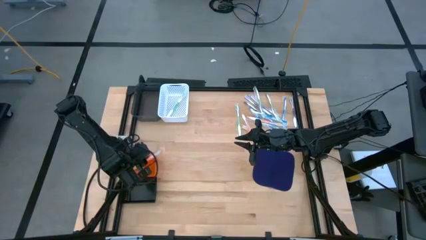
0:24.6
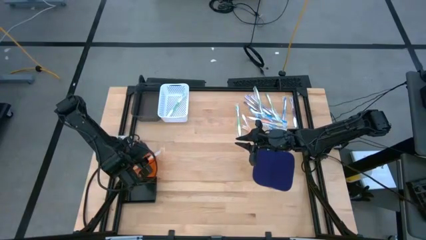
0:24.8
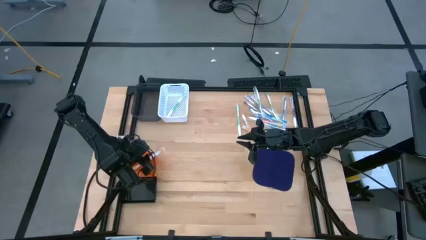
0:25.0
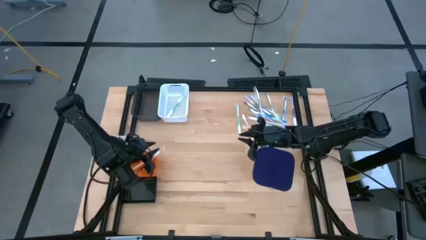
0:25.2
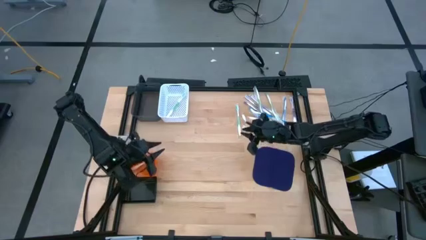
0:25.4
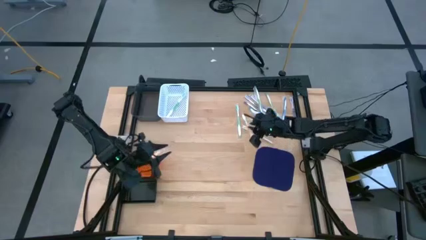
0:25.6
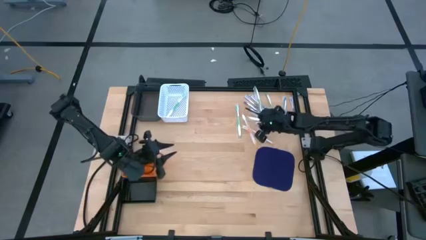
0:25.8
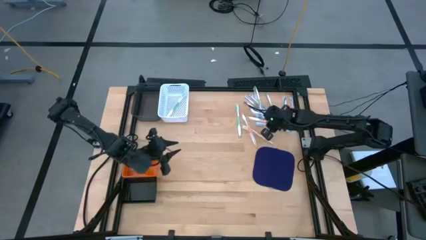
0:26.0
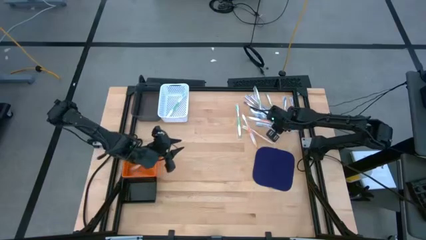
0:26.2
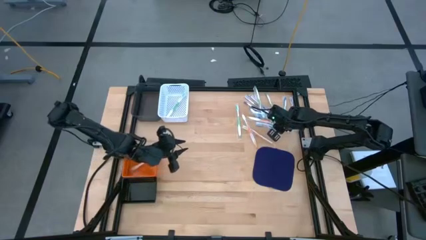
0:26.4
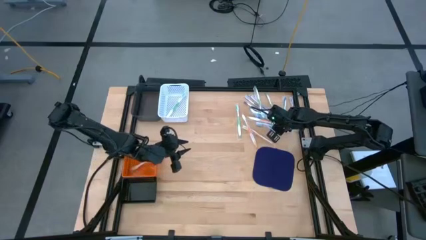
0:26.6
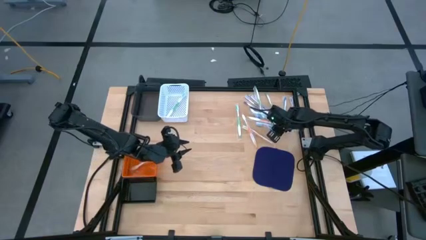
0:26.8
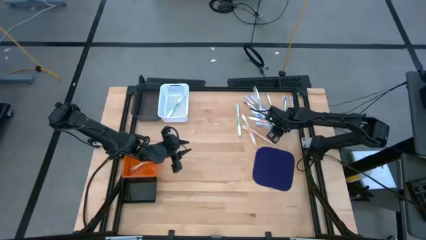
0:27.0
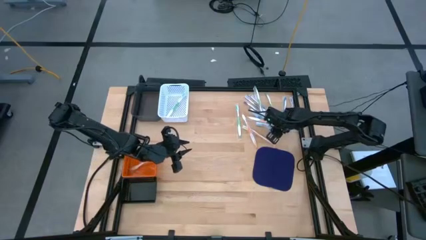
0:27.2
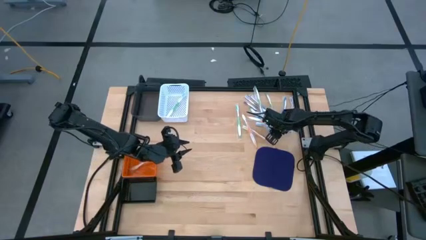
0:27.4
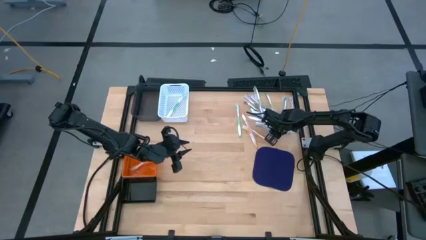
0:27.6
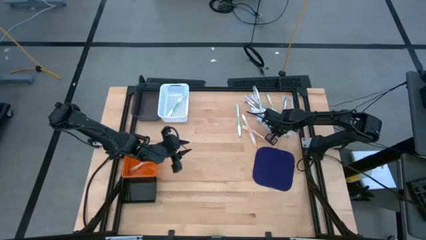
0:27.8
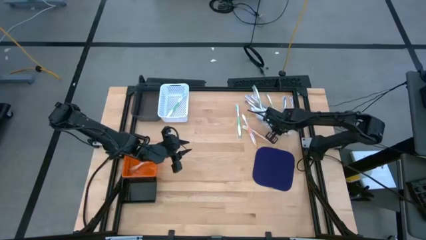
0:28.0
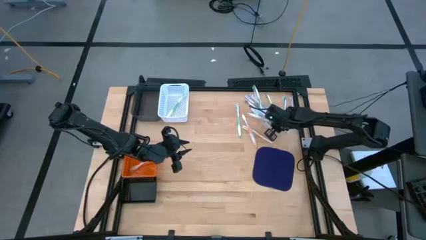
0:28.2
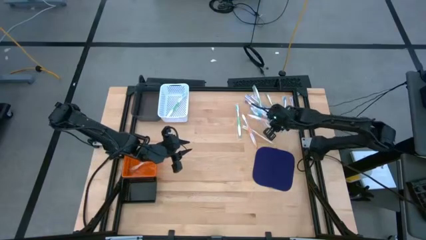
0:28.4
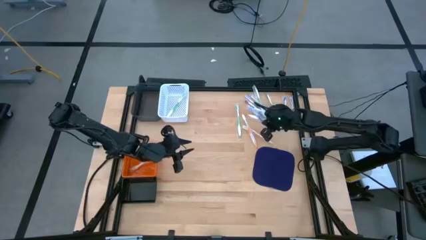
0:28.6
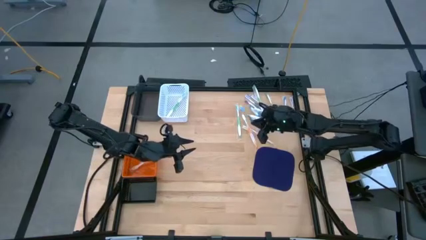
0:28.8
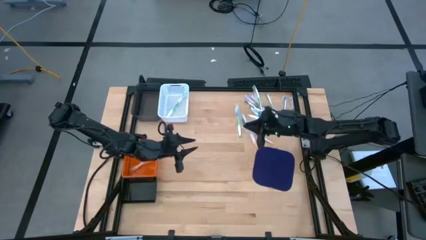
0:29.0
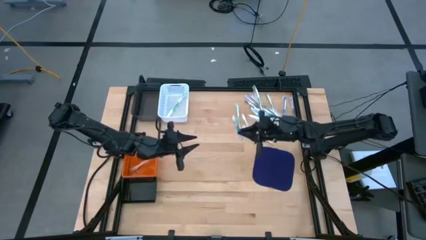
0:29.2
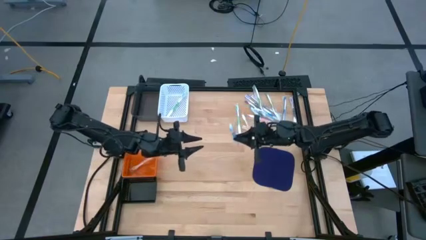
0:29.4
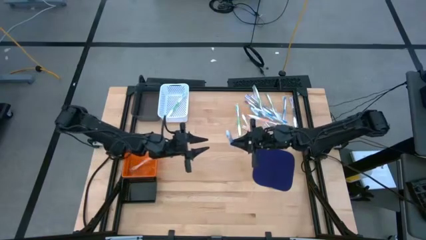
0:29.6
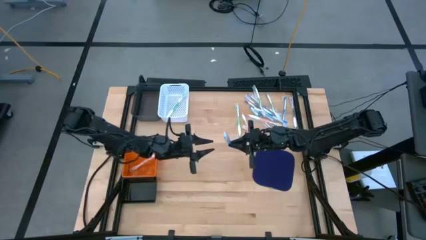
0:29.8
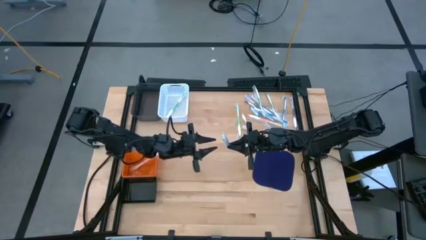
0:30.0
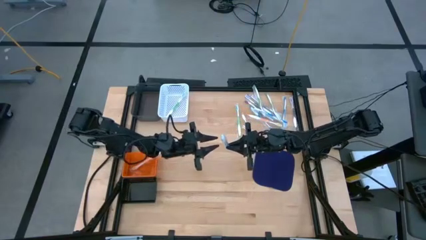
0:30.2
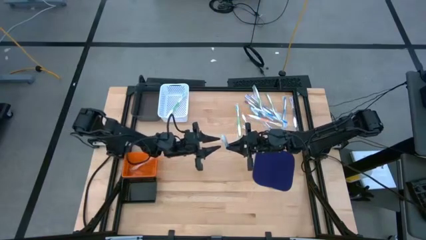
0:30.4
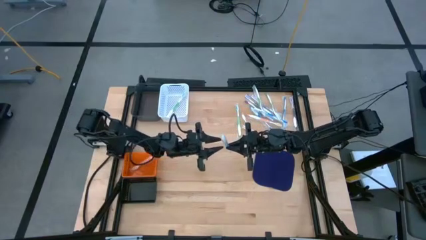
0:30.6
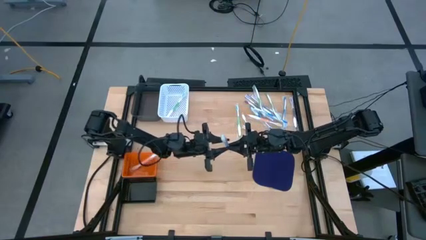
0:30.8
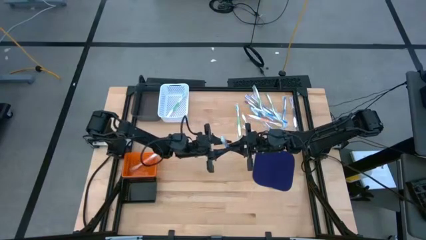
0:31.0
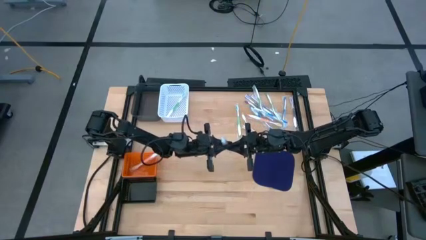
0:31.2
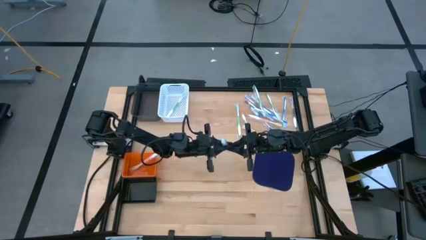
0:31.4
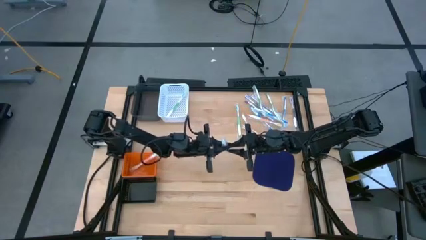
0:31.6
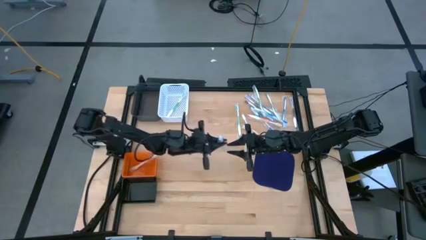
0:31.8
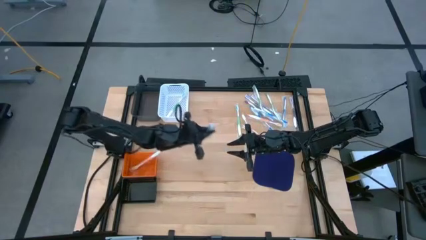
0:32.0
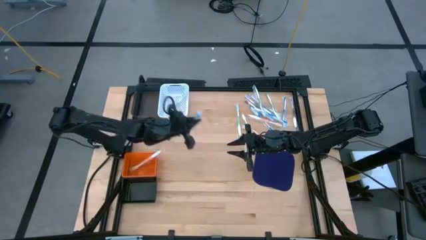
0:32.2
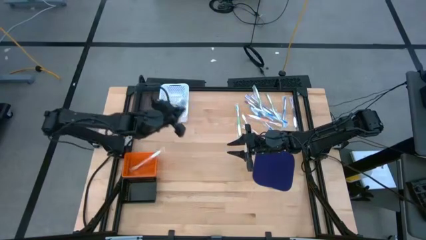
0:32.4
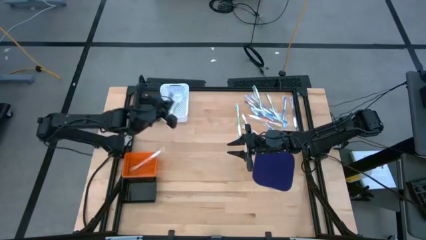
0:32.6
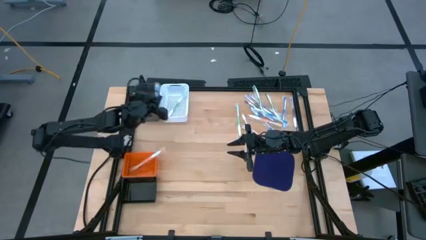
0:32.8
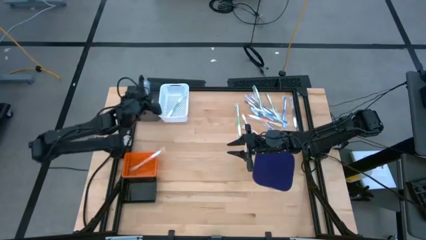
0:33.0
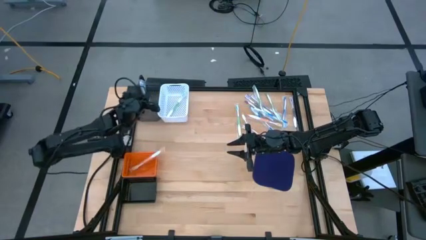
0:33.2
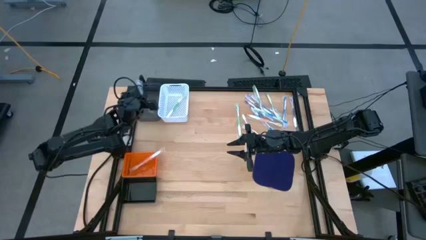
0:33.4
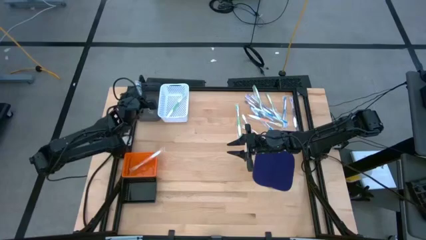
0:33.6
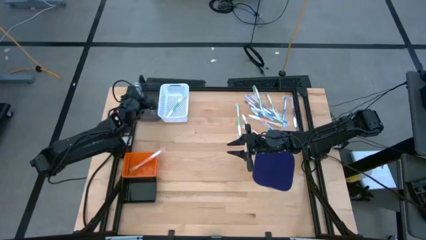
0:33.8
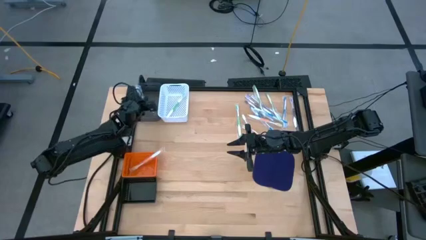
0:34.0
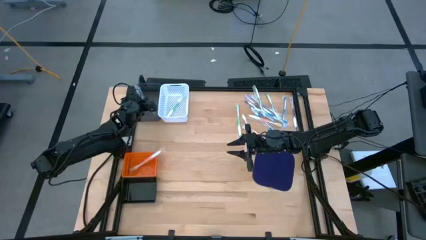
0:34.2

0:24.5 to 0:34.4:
Task: Pick & Place Toothbrushes
Put the blue toothbrush into the gray bin

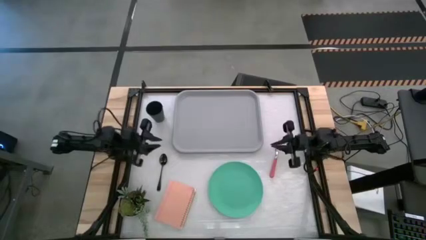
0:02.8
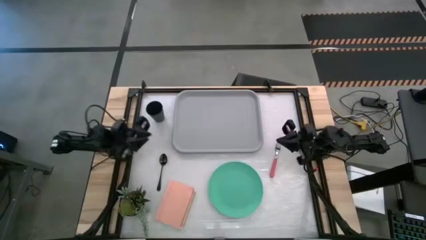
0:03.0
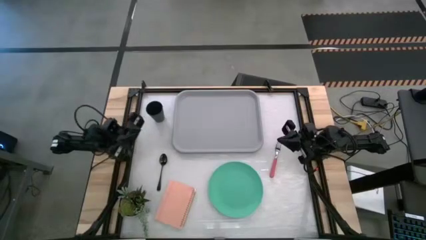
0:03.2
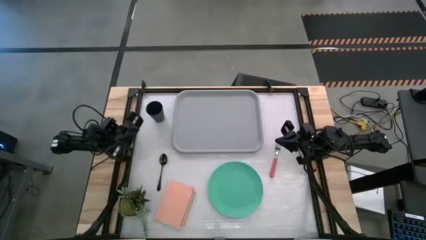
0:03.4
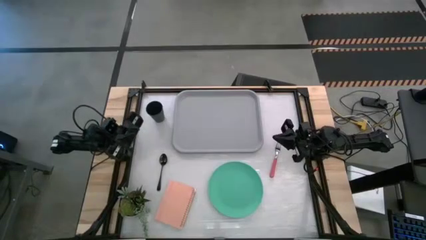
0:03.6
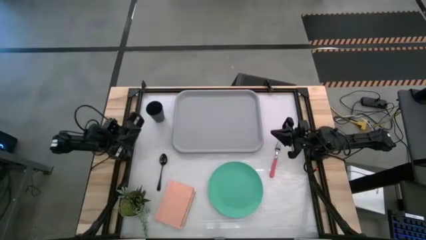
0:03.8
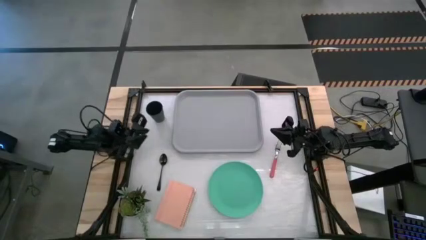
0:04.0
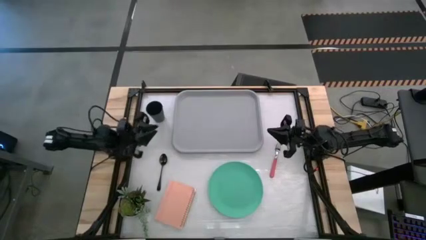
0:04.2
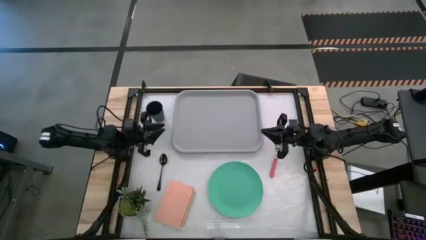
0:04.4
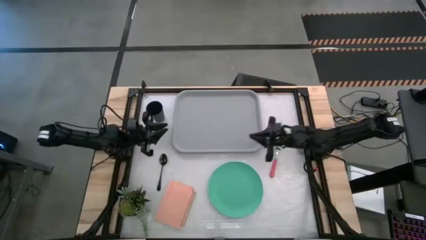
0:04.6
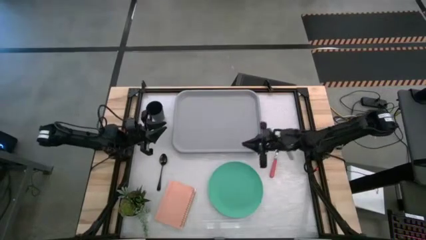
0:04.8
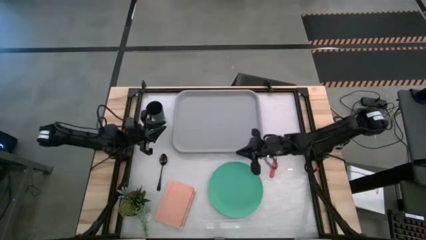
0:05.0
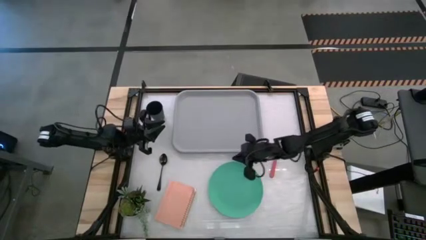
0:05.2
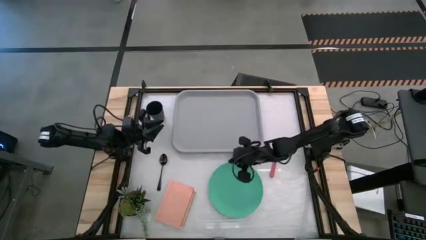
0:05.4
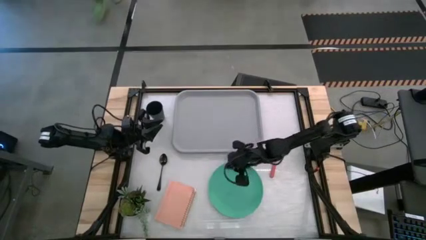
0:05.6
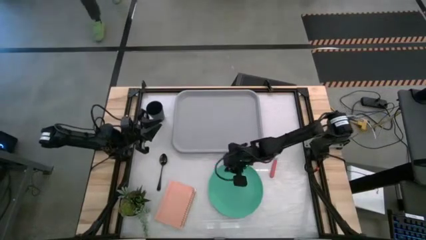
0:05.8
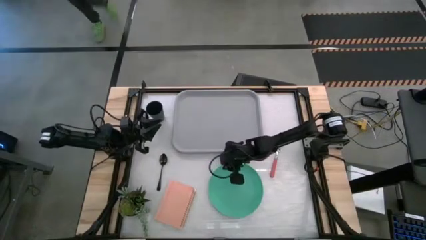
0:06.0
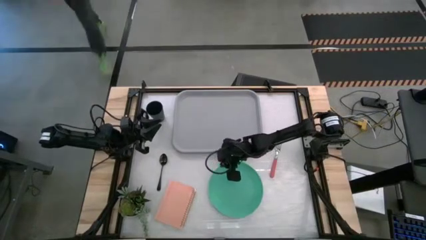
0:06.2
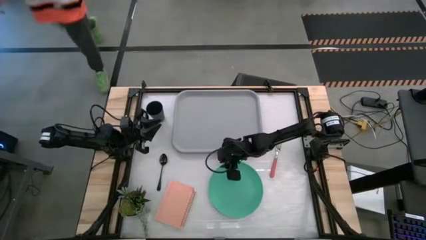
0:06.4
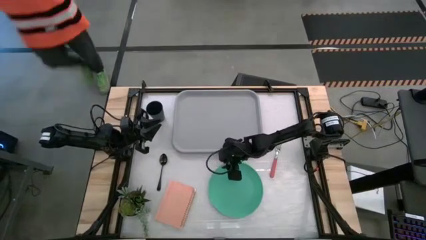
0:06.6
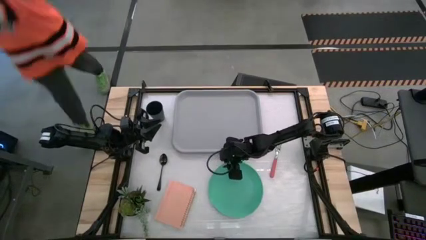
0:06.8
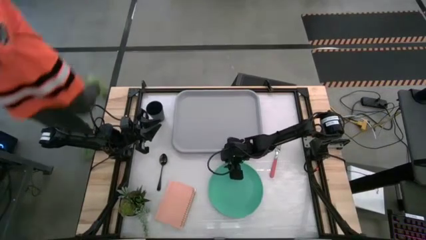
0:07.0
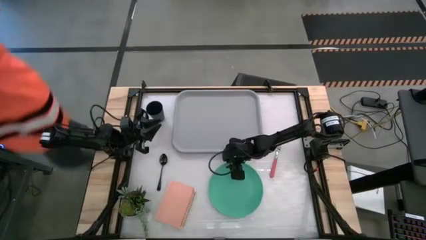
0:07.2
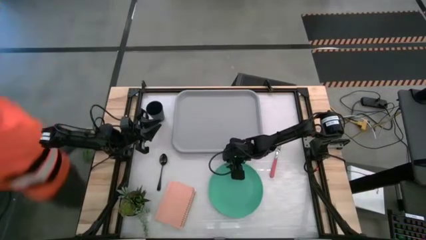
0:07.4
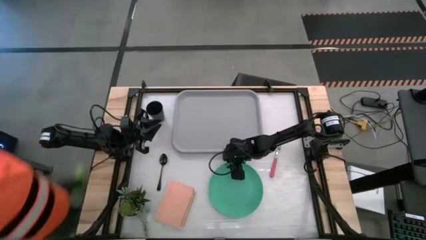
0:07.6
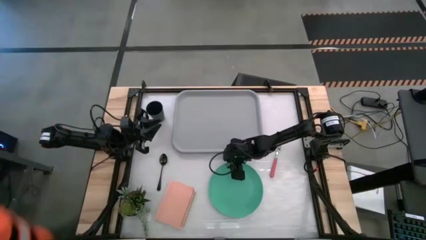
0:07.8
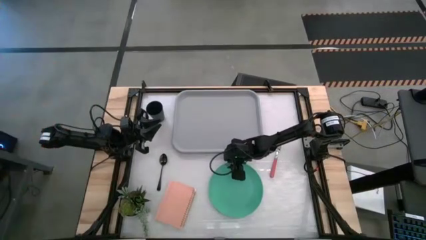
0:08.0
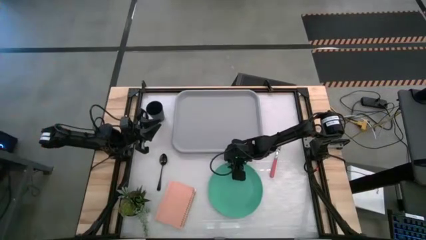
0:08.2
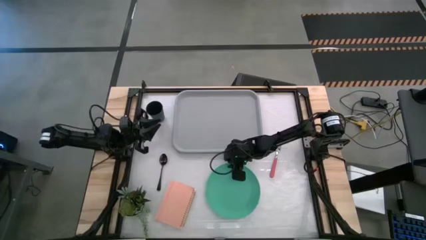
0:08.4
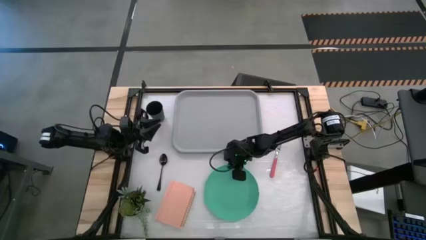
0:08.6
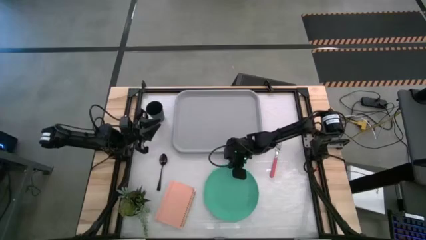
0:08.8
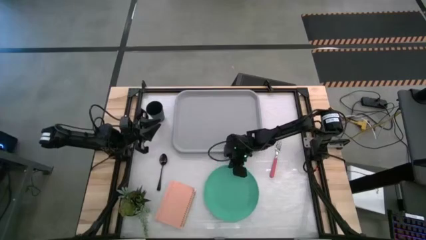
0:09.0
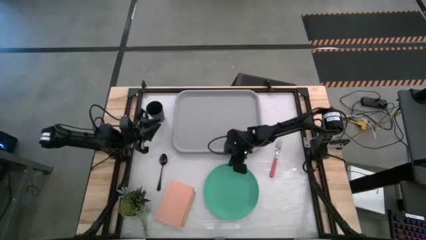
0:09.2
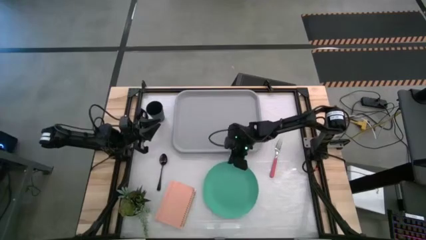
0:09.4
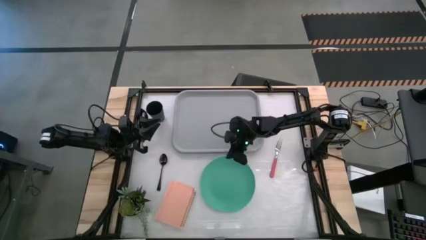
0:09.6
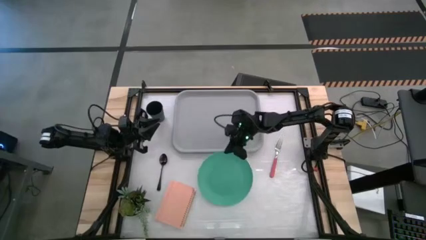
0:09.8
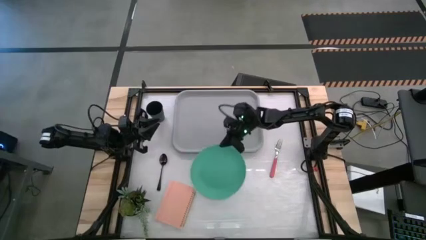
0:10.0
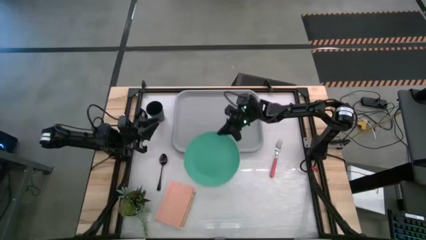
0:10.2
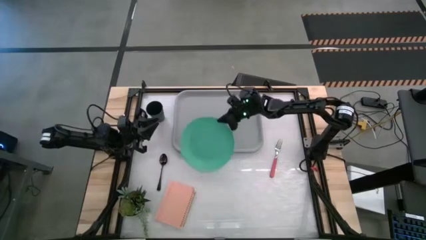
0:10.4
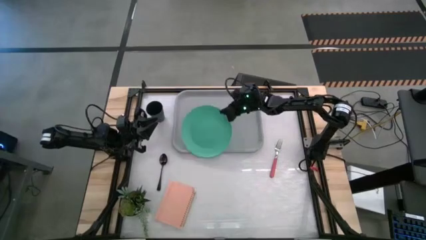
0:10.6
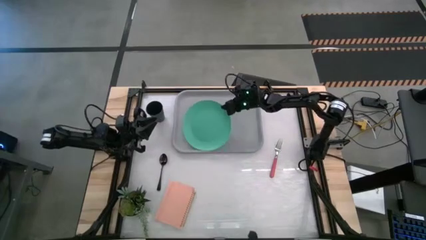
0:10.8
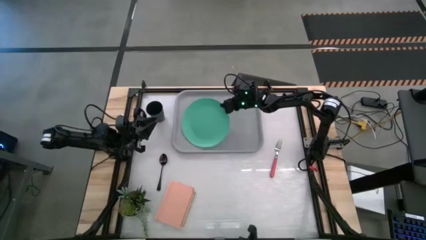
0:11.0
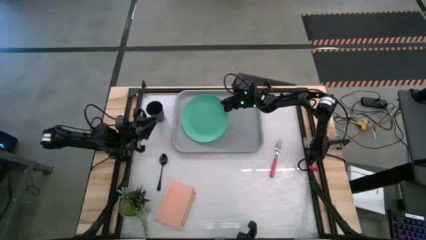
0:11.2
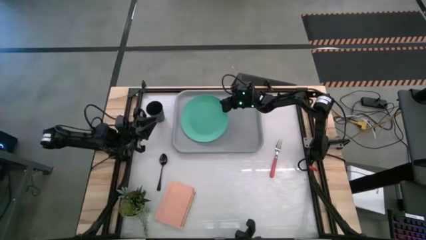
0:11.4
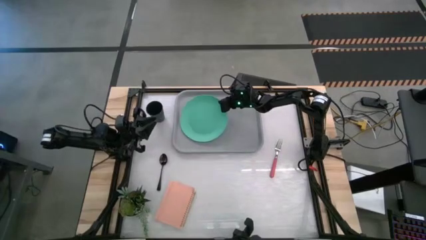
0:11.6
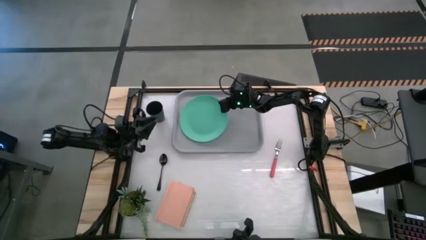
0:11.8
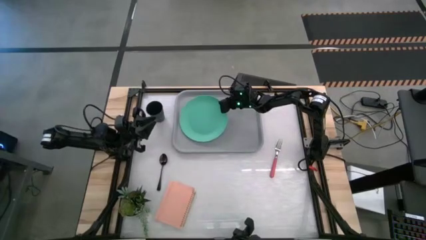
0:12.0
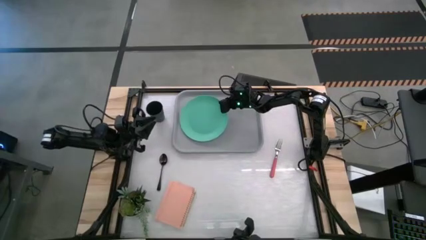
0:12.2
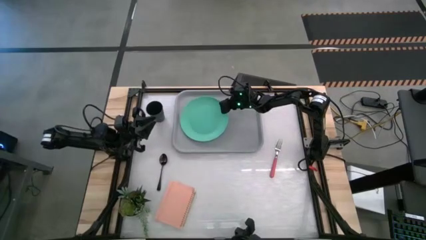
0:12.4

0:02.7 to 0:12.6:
Task: Pick and place plate/cup/fork/spoon on tray
Put the green plate on the gray food tray
